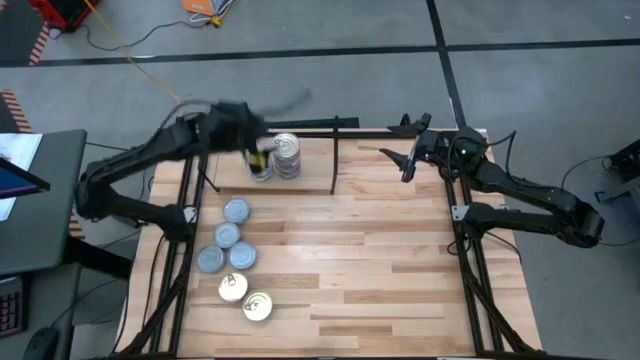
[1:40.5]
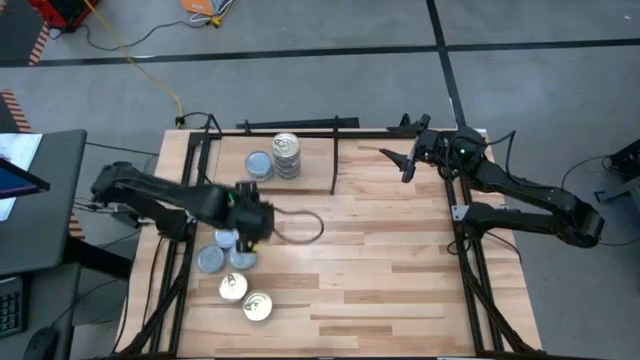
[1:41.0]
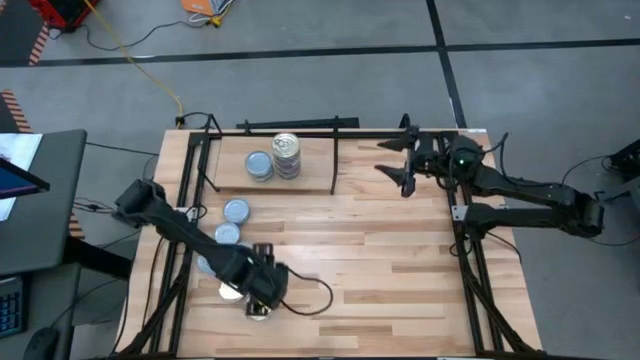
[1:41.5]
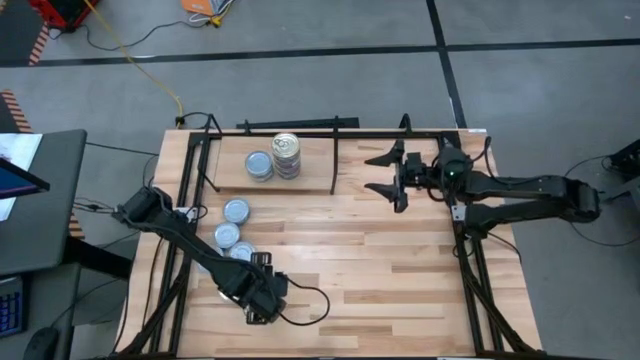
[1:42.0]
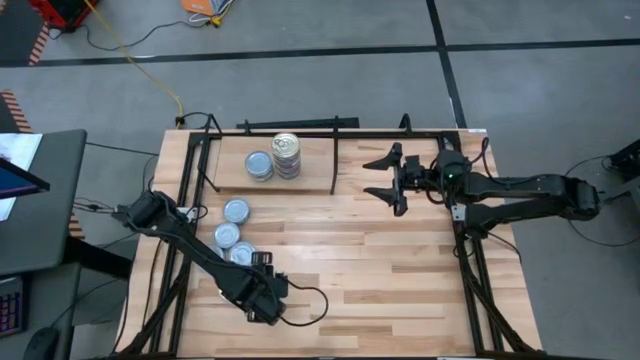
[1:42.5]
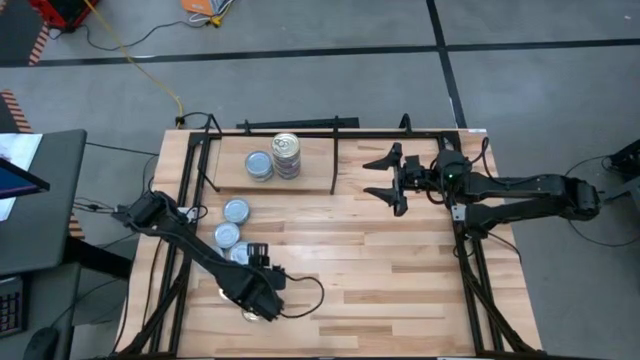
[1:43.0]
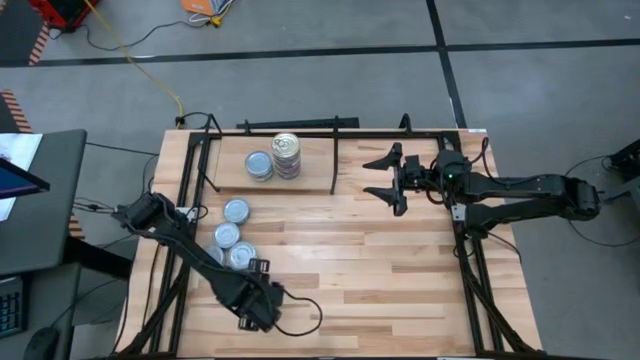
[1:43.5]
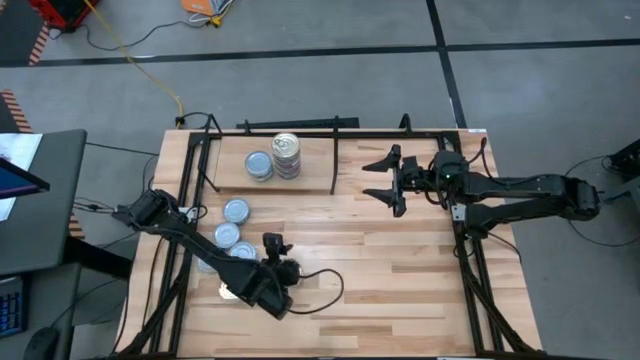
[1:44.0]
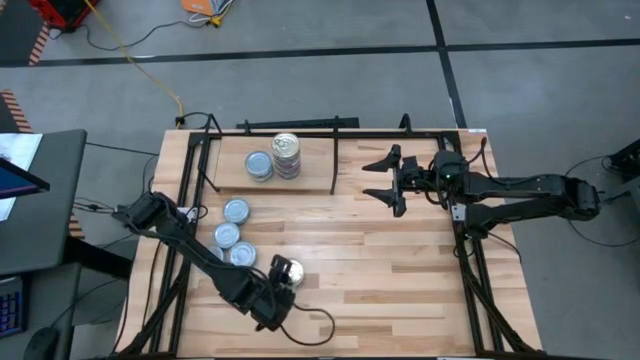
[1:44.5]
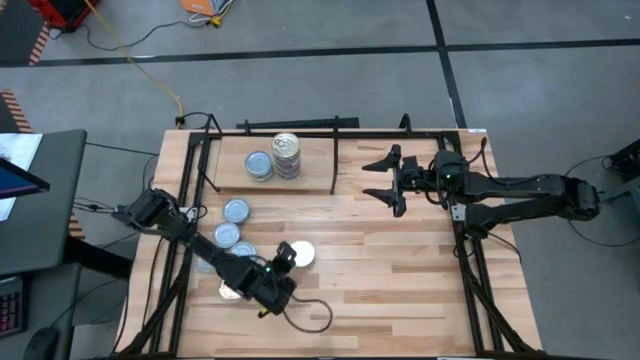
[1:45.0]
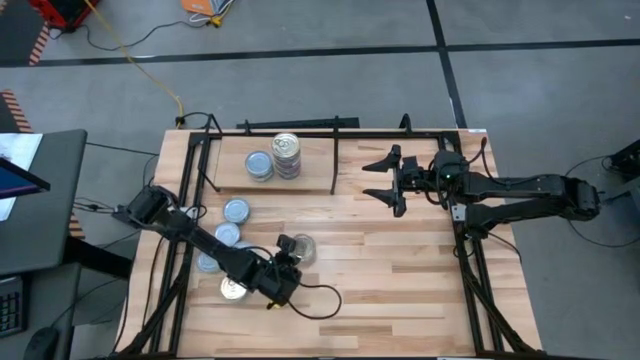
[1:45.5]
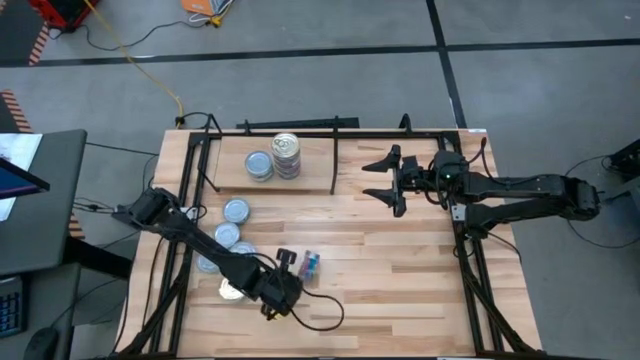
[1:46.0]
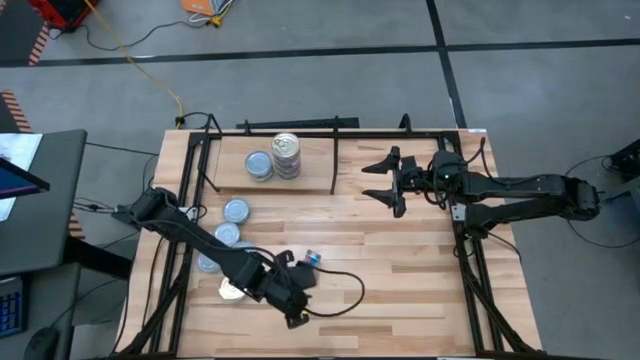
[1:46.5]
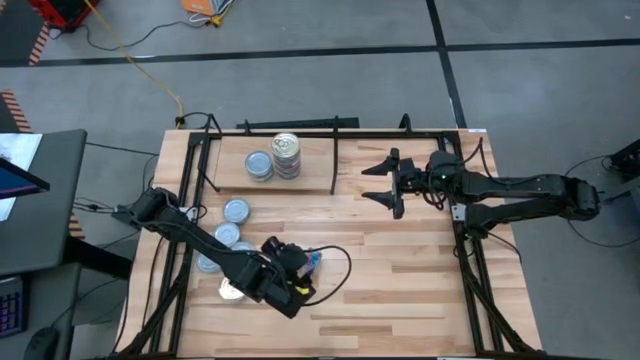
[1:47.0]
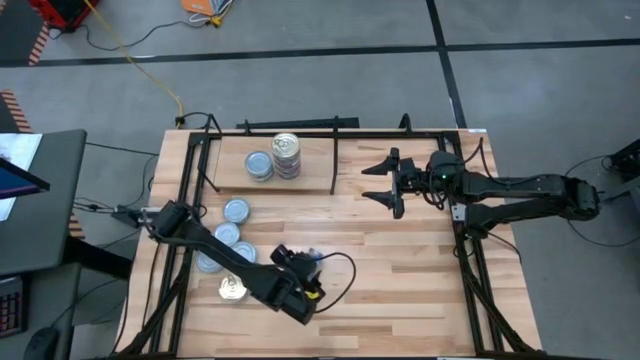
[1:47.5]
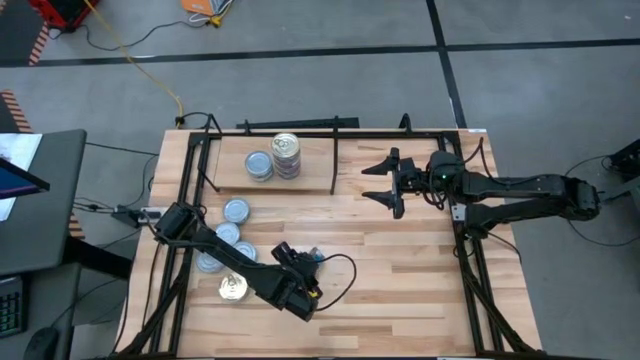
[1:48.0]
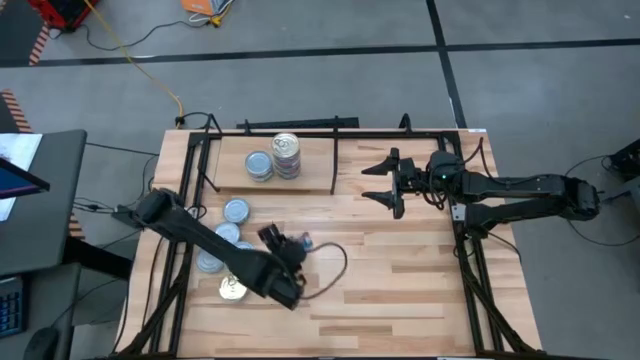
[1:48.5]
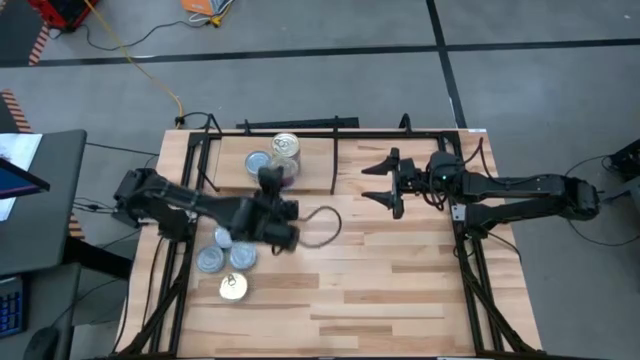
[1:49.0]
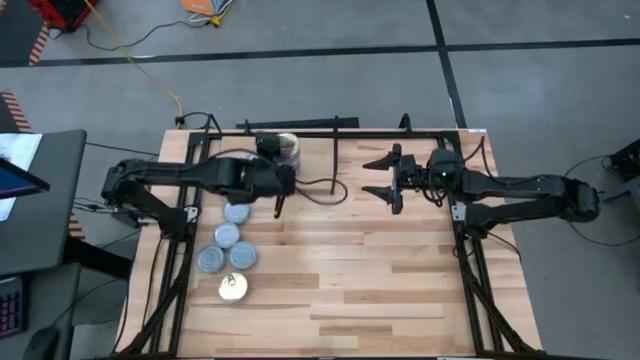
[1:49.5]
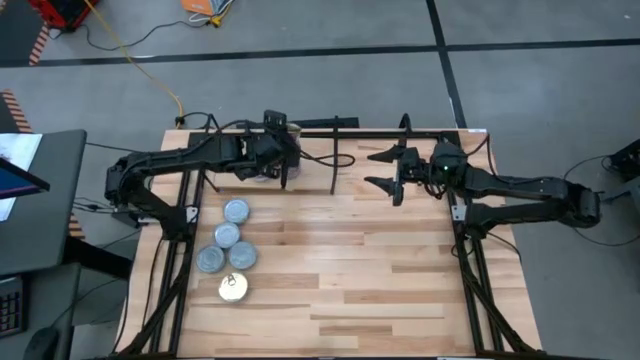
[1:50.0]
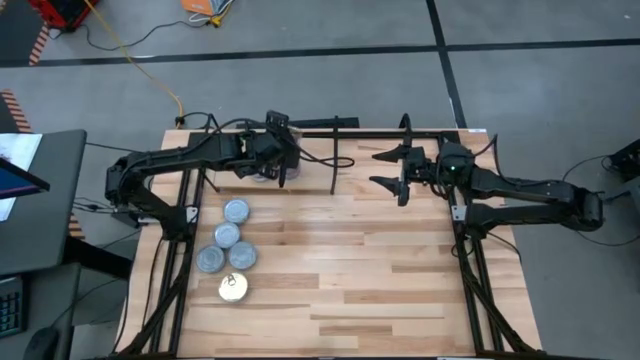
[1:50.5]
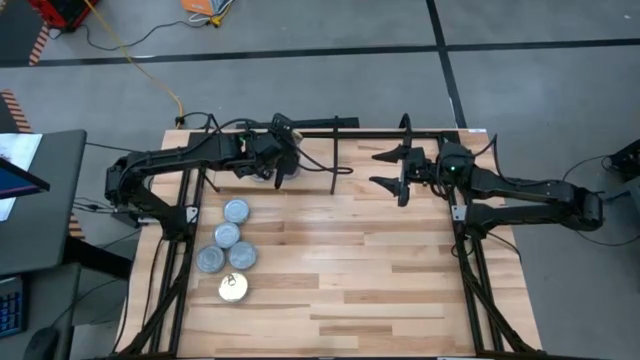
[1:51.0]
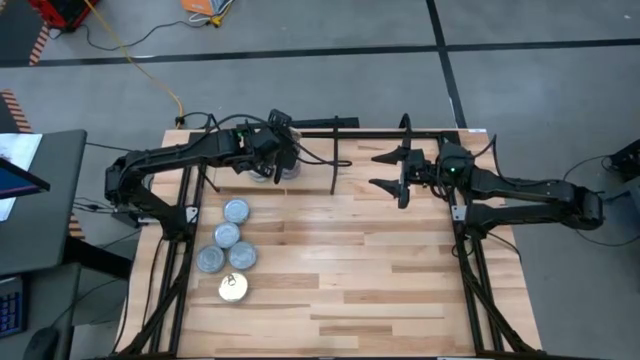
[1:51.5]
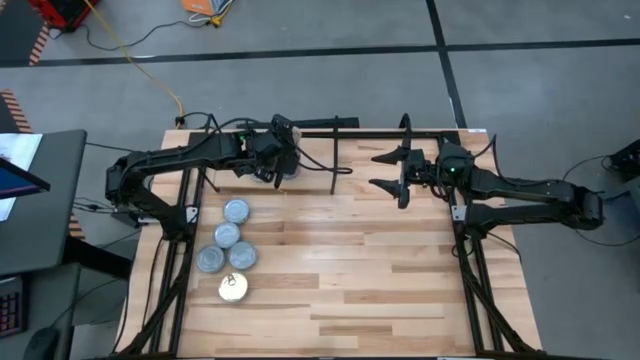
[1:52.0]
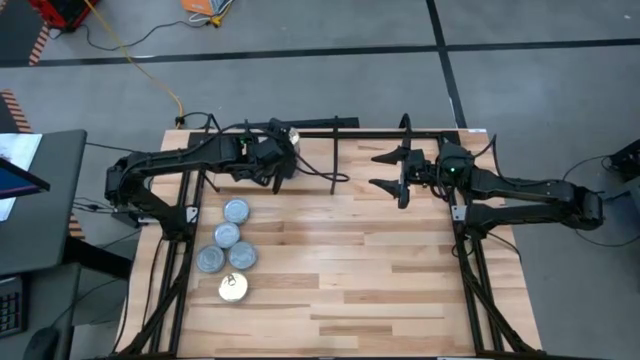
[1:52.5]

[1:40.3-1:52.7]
Task: Stack canned seafood by type on shelf
Stack the blue pink tuna can on top of the blue pink tuna cans on the shelf

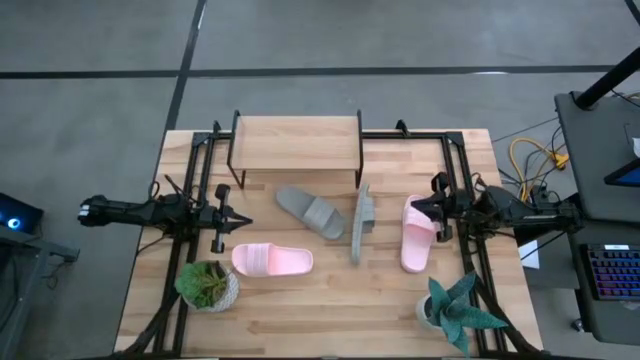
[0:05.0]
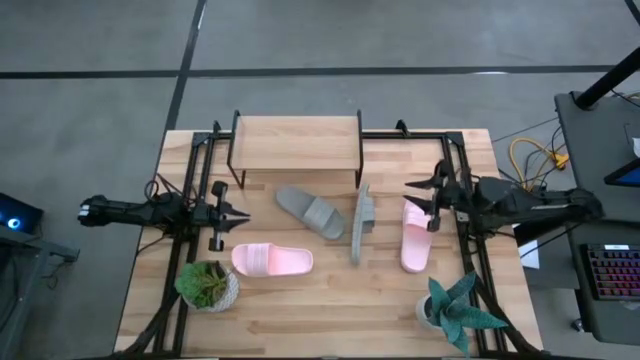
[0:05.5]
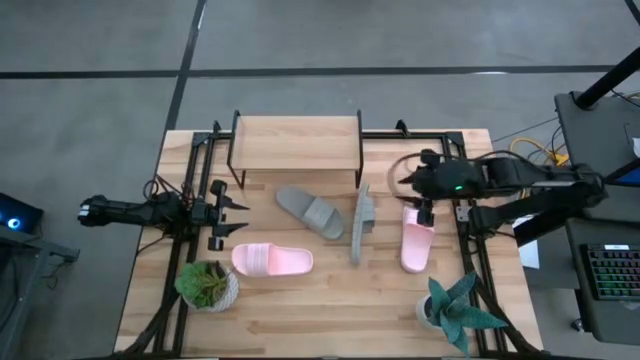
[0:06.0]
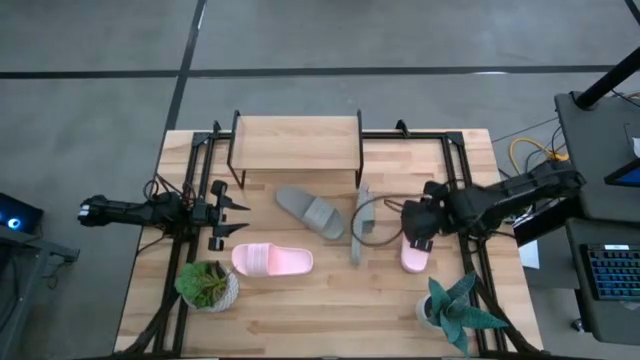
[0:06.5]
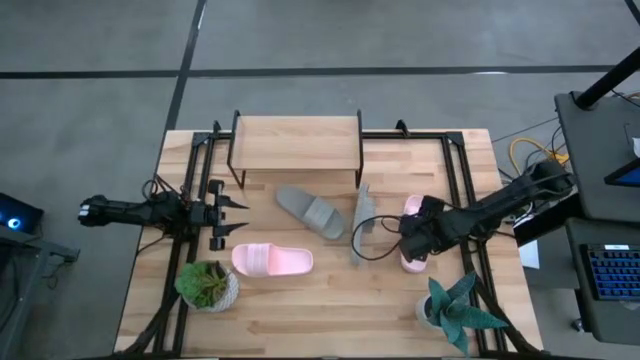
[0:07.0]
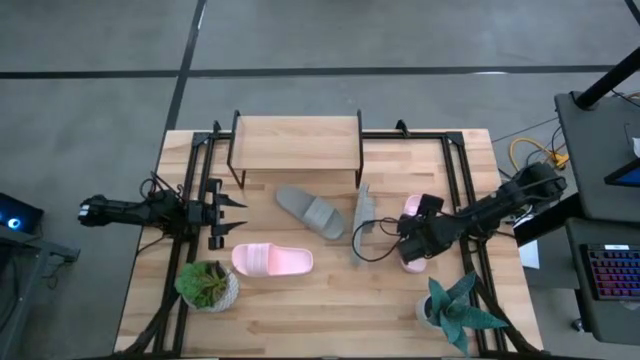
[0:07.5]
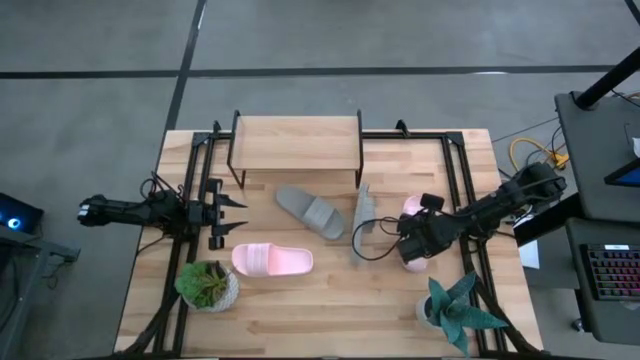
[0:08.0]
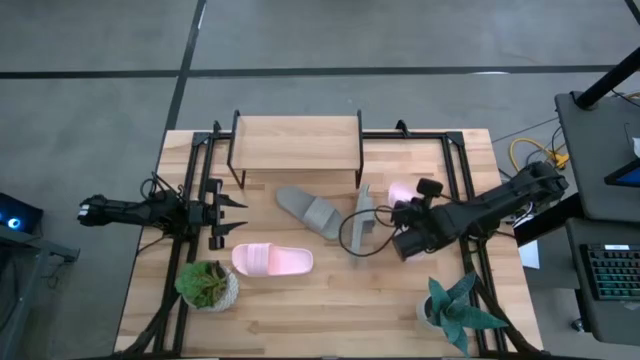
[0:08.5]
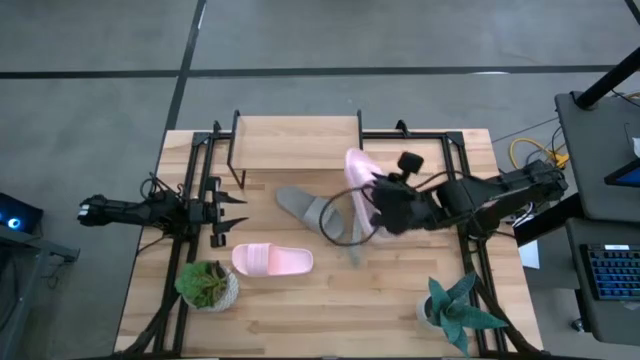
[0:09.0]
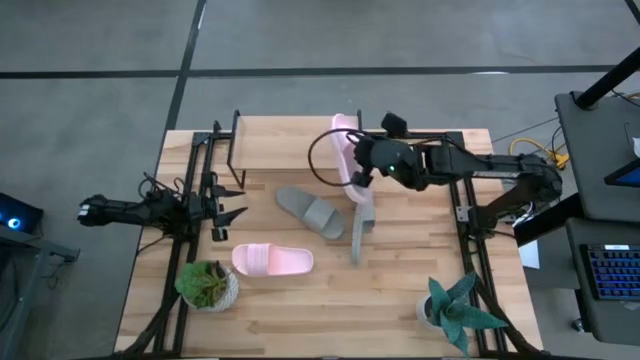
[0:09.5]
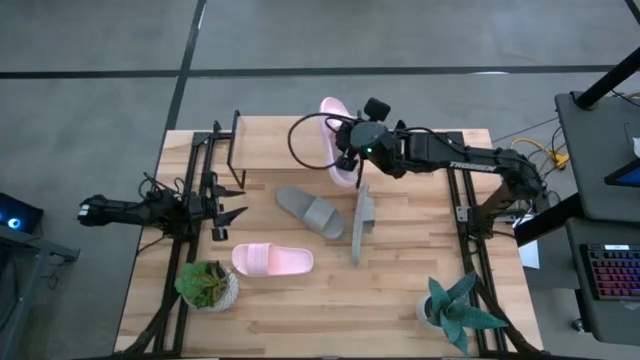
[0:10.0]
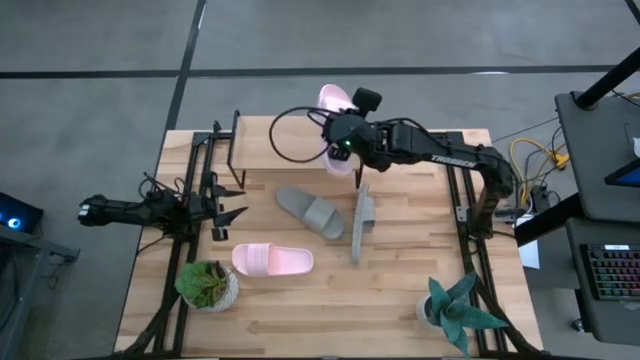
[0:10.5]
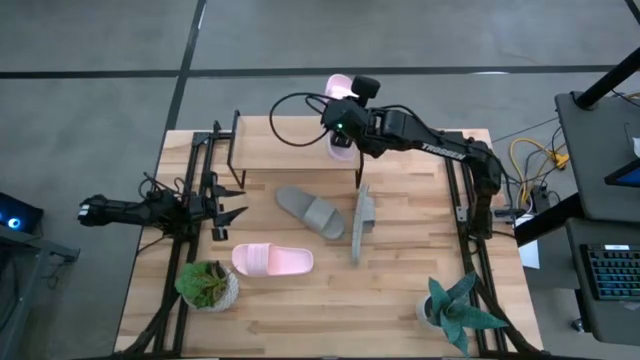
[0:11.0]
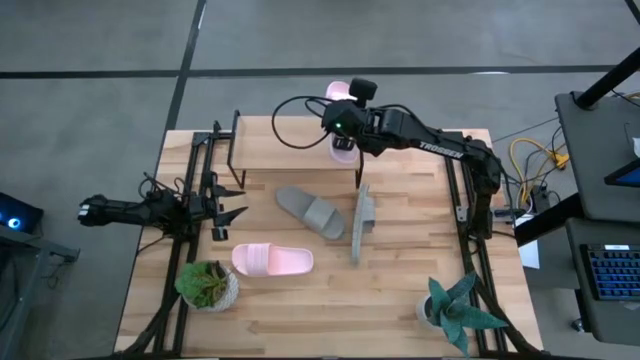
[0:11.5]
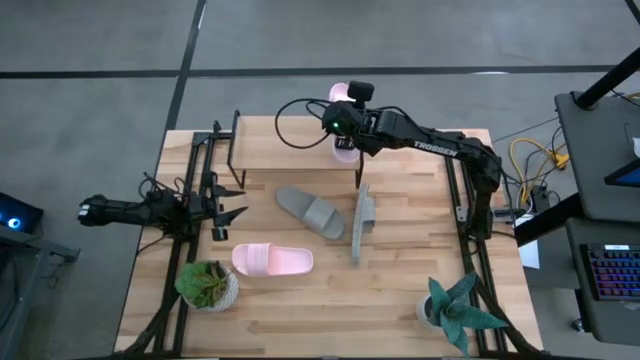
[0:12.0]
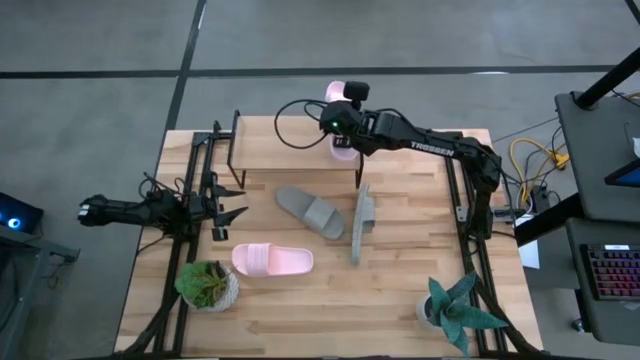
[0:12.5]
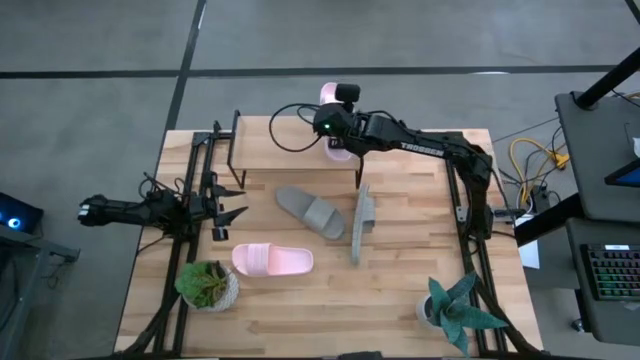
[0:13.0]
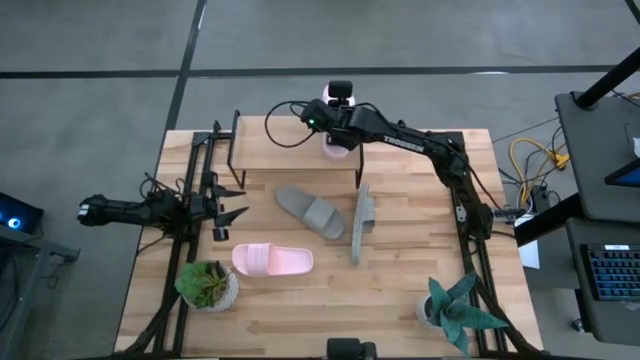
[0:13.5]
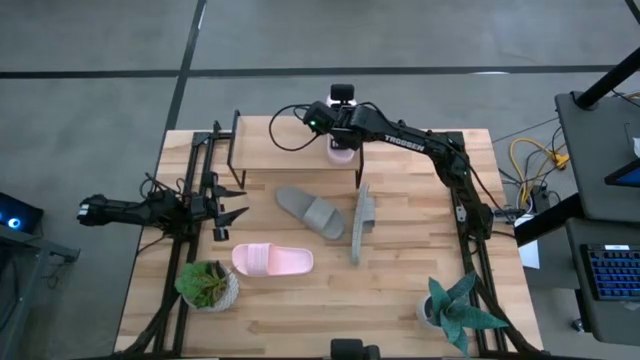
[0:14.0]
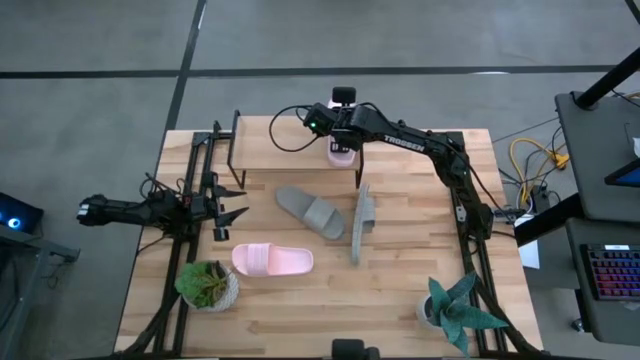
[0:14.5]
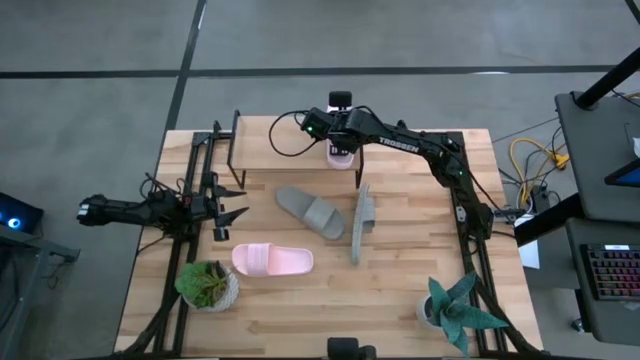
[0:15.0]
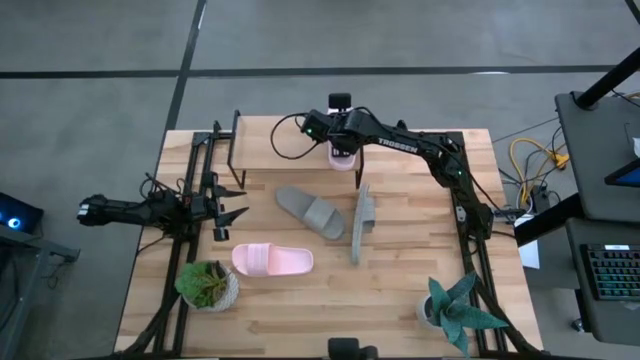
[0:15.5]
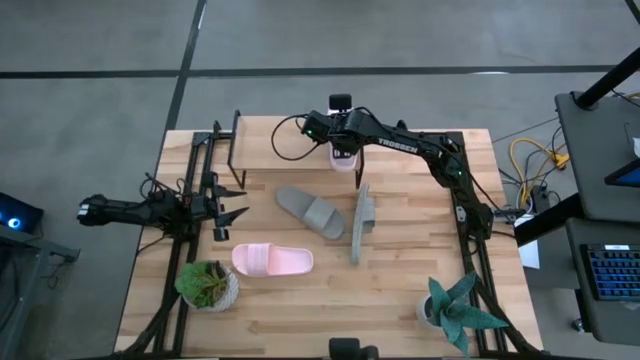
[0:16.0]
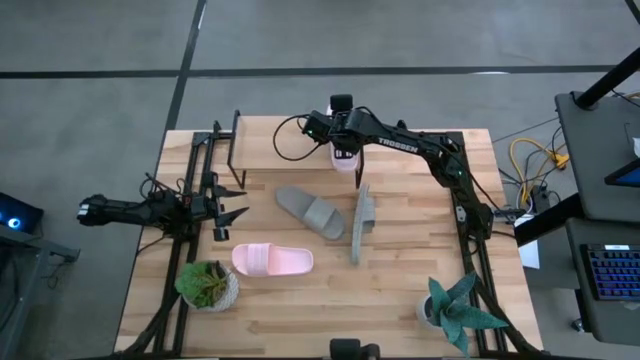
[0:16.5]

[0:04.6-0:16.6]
Task: Pick and place slides into the shelf
Put the right pink slipper on the shelf
